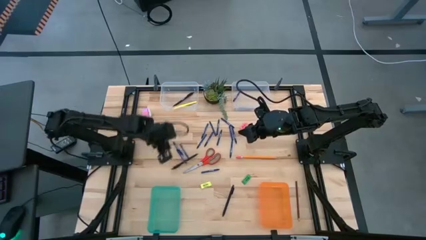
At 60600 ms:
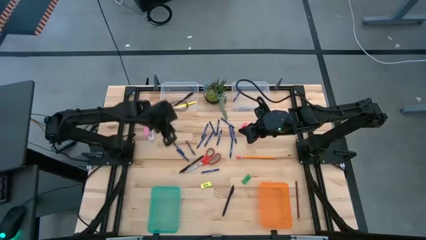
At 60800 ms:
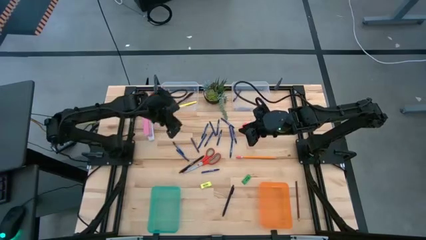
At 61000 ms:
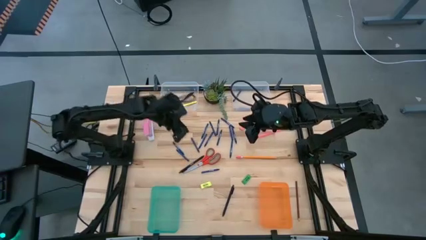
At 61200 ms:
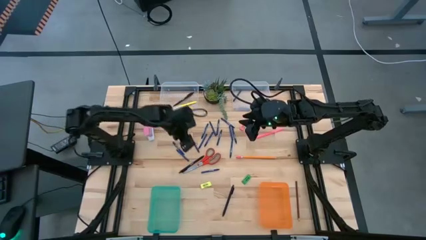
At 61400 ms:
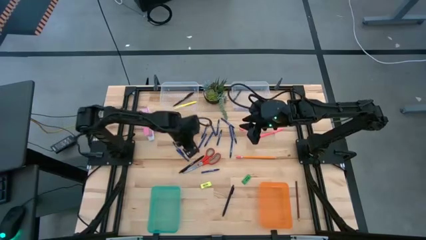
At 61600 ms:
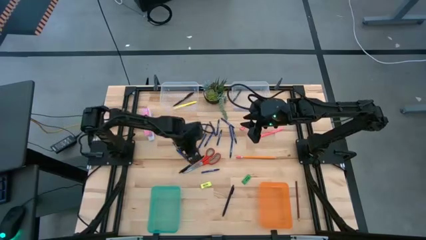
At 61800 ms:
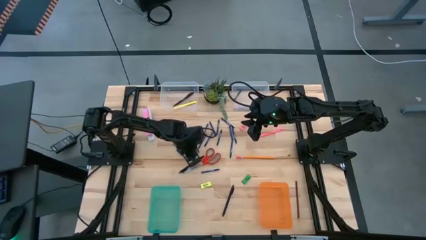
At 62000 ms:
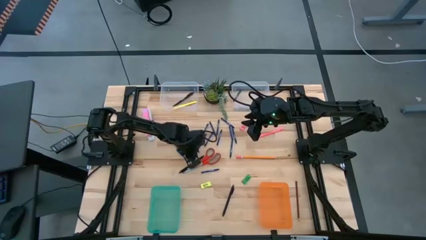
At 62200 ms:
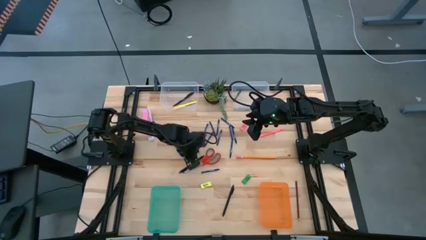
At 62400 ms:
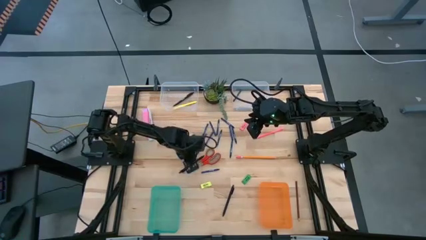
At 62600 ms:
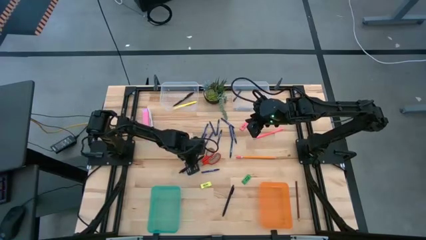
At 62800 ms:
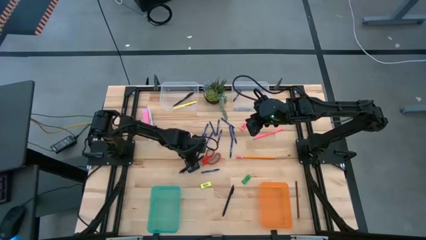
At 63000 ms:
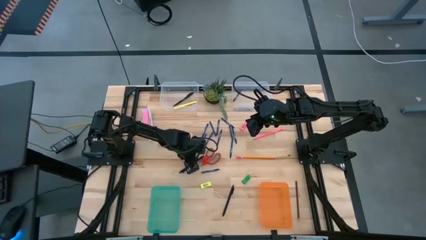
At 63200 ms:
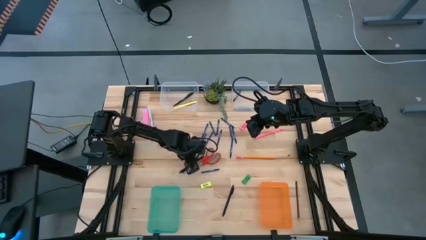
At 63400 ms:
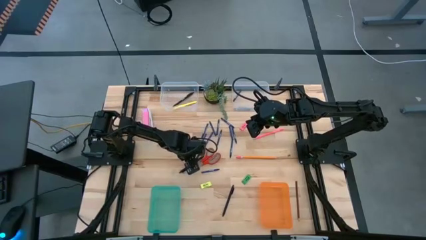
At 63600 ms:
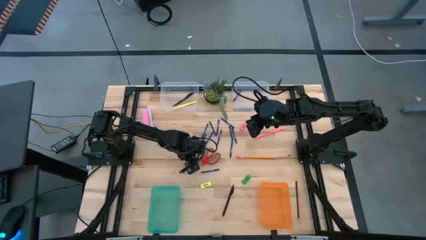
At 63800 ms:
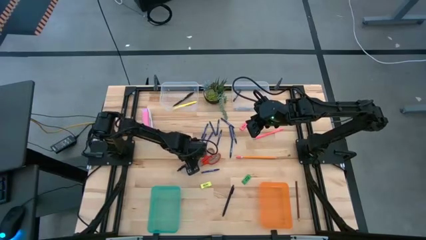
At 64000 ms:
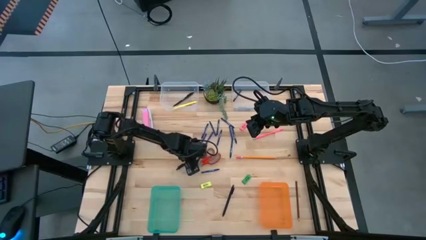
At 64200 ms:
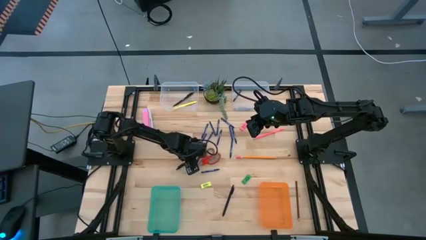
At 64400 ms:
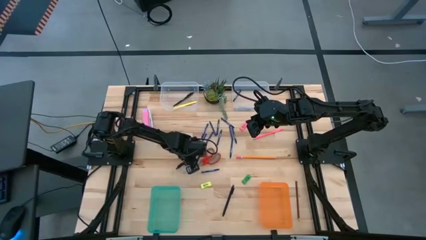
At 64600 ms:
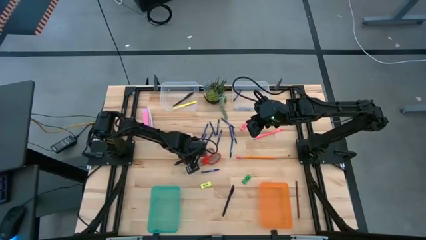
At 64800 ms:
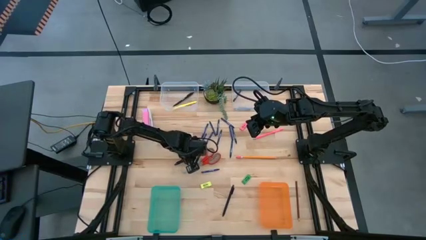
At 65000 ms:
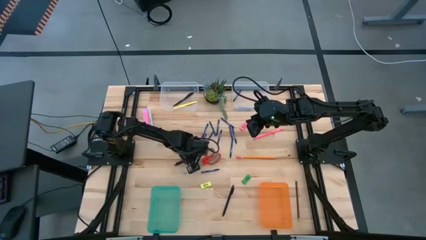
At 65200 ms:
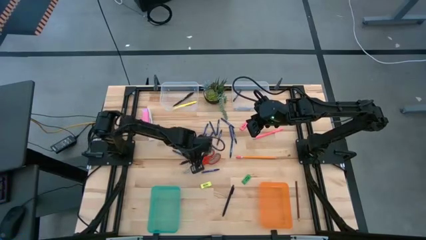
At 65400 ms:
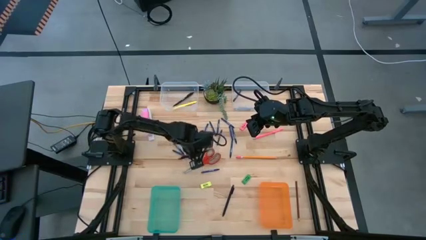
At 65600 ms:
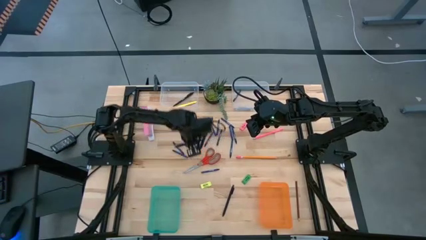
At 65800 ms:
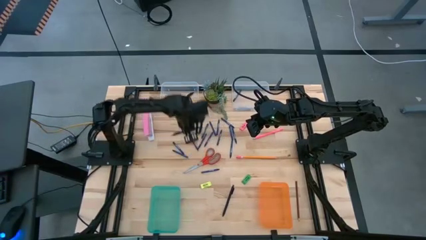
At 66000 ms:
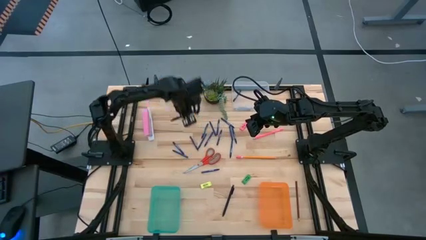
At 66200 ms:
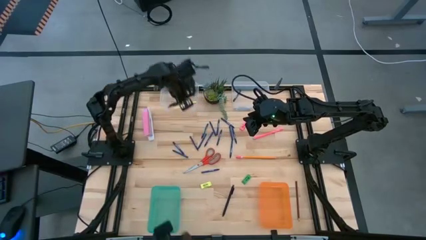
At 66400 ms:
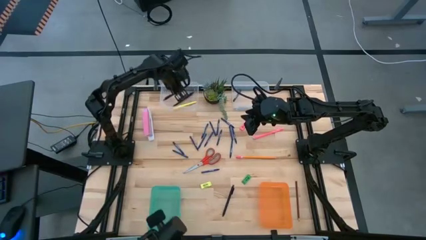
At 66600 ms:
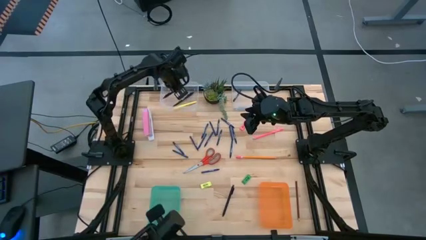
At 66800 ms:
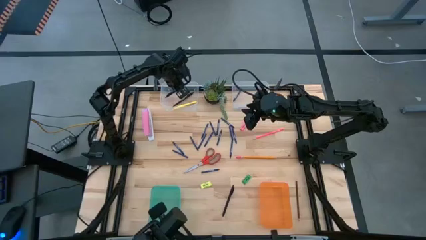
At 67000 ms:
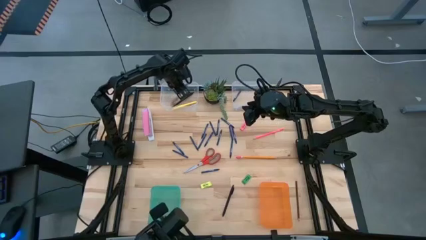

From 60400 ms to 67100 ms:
Task: Sort crayons/erasers/pens/pencils in bins
Put the black pen into the left transparent bin

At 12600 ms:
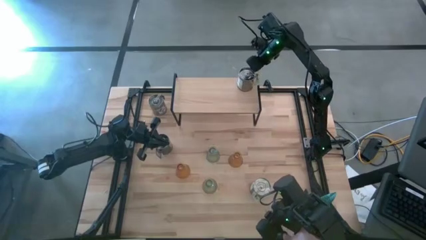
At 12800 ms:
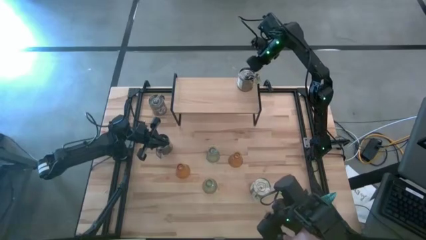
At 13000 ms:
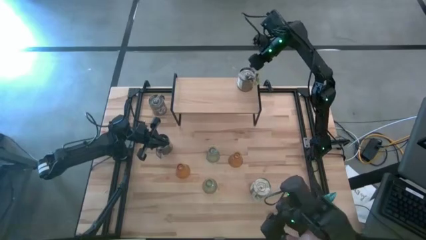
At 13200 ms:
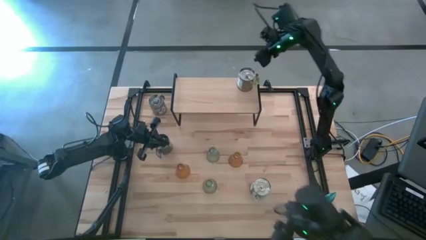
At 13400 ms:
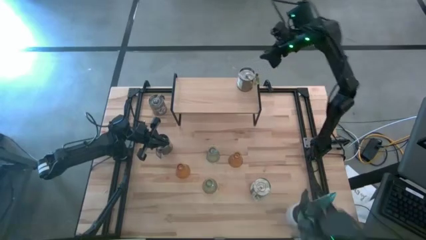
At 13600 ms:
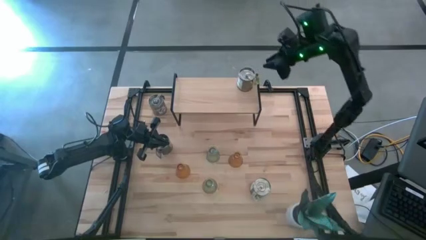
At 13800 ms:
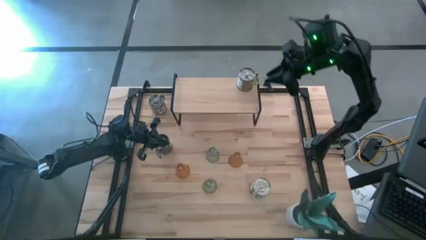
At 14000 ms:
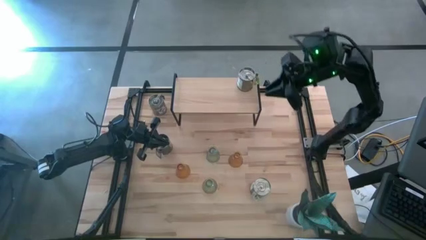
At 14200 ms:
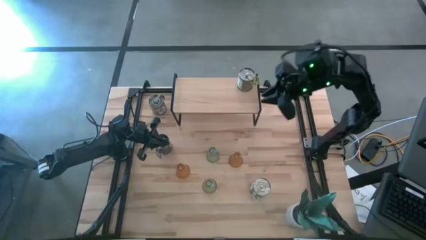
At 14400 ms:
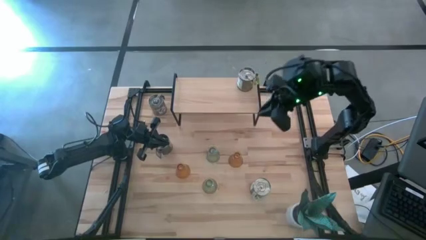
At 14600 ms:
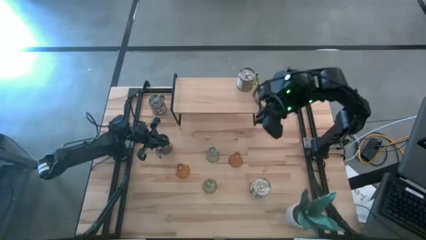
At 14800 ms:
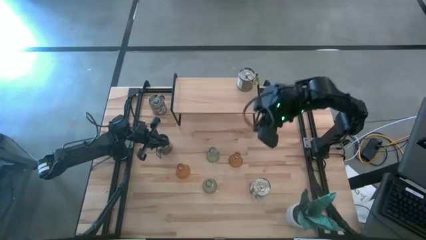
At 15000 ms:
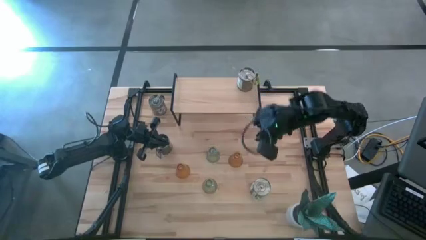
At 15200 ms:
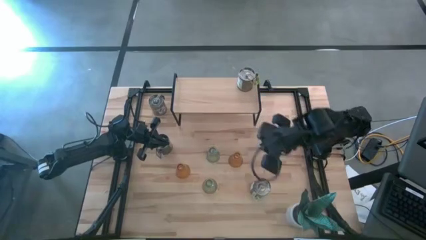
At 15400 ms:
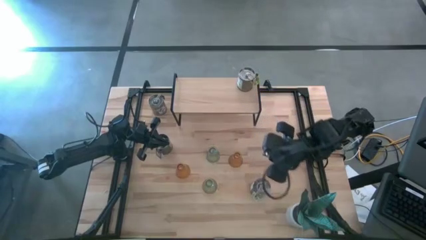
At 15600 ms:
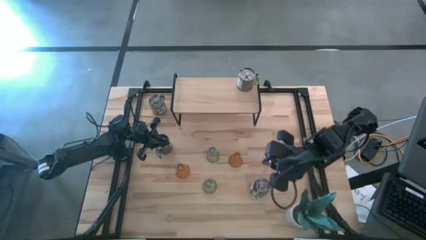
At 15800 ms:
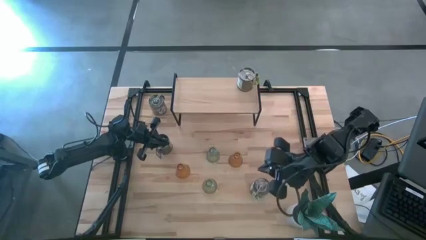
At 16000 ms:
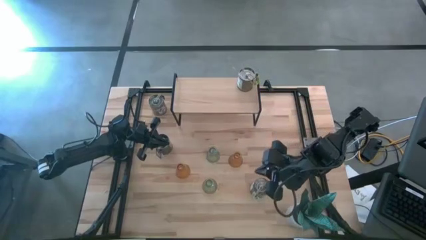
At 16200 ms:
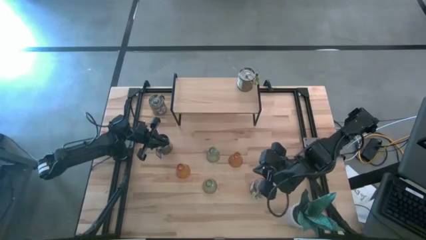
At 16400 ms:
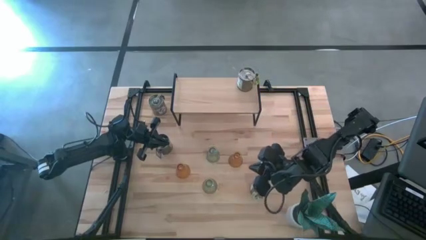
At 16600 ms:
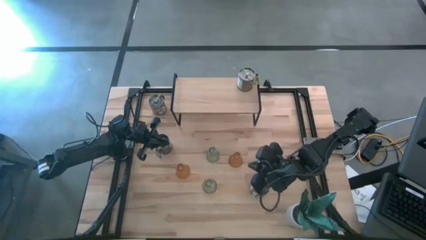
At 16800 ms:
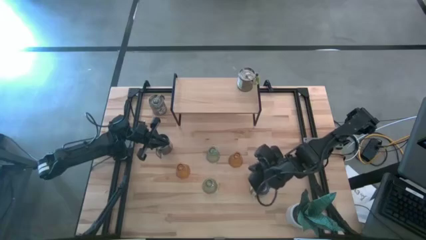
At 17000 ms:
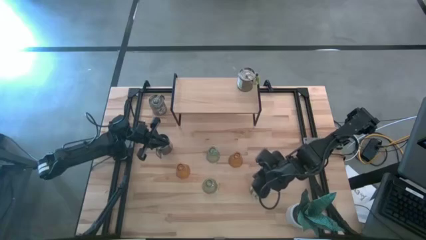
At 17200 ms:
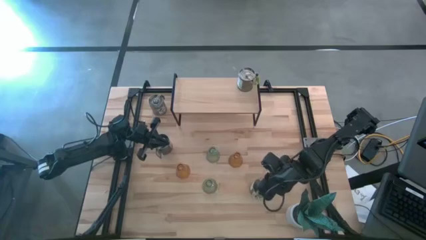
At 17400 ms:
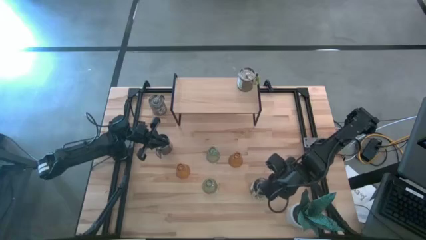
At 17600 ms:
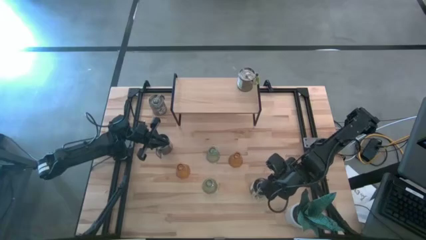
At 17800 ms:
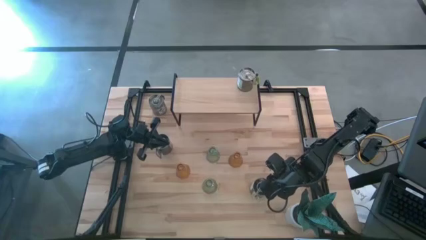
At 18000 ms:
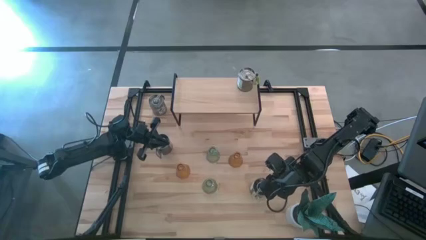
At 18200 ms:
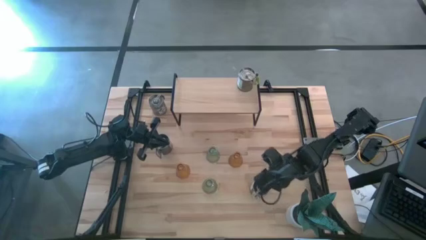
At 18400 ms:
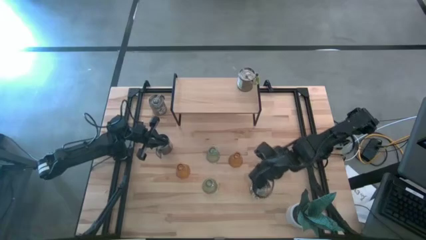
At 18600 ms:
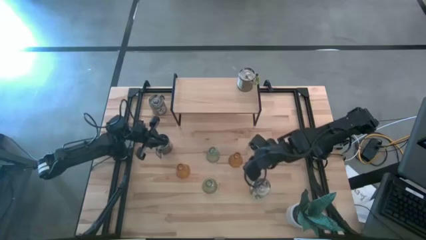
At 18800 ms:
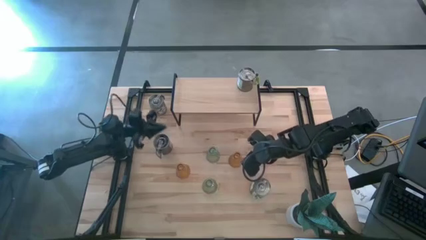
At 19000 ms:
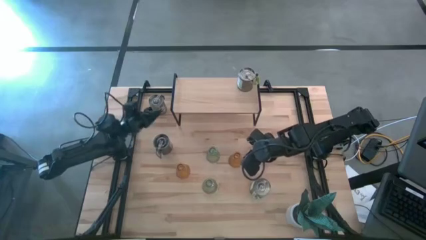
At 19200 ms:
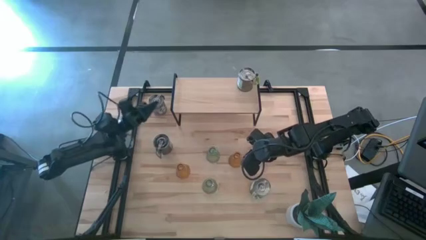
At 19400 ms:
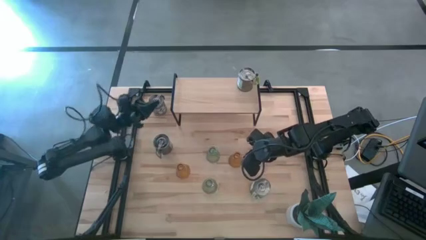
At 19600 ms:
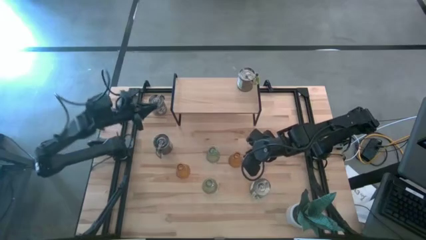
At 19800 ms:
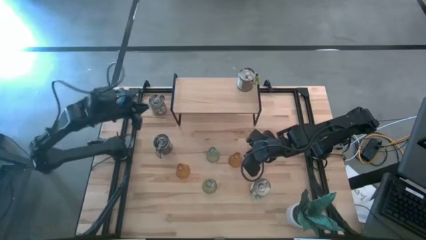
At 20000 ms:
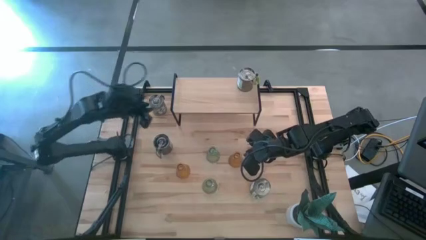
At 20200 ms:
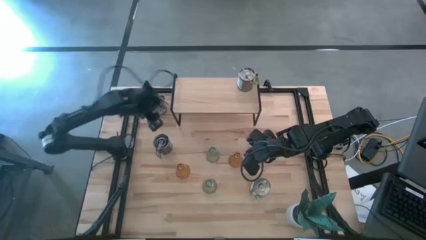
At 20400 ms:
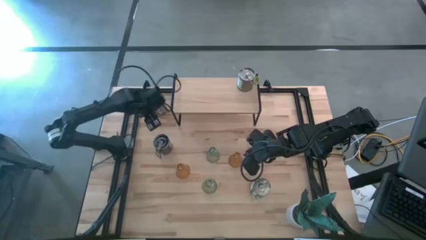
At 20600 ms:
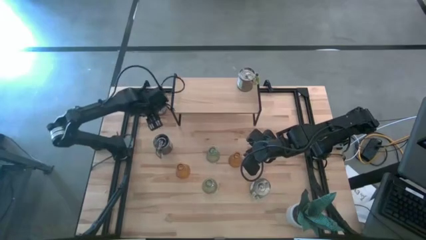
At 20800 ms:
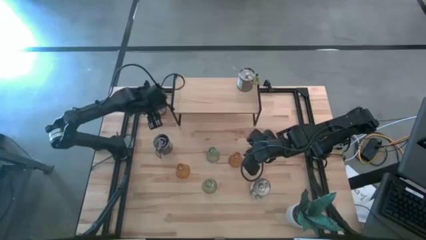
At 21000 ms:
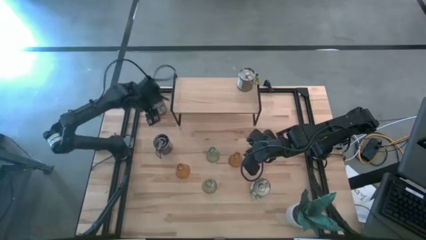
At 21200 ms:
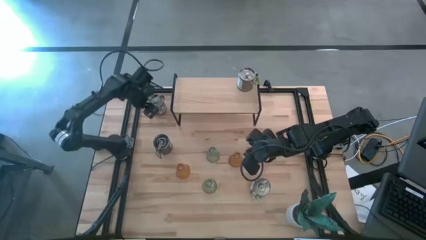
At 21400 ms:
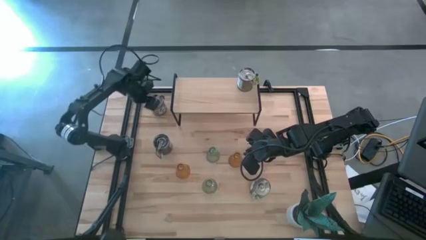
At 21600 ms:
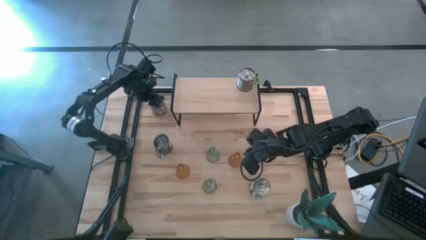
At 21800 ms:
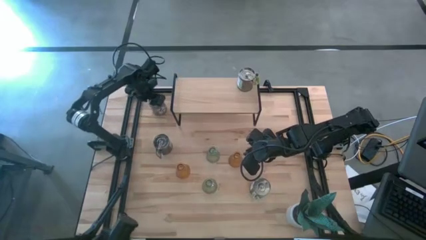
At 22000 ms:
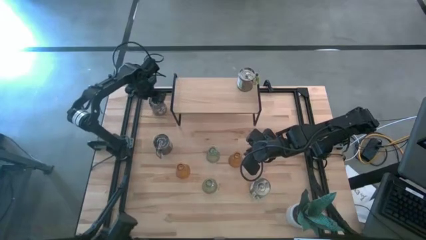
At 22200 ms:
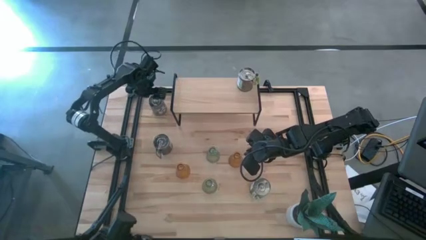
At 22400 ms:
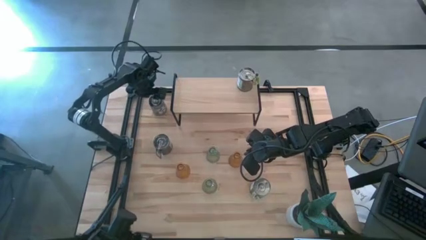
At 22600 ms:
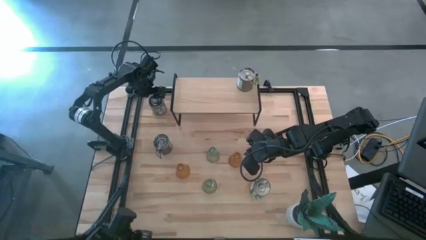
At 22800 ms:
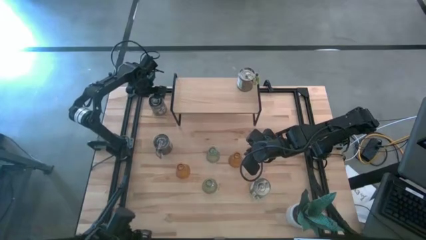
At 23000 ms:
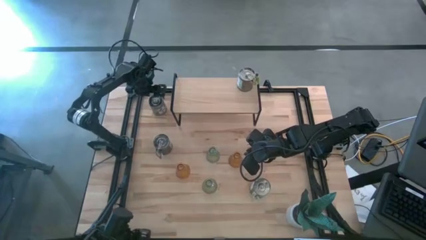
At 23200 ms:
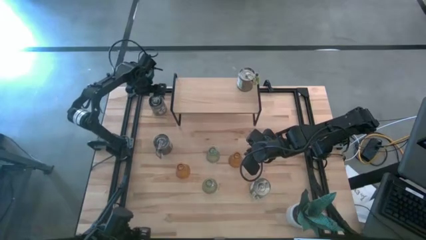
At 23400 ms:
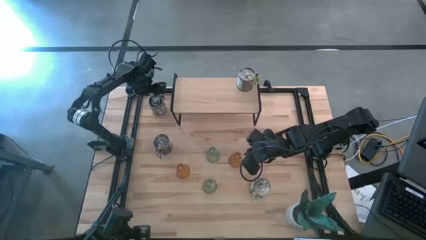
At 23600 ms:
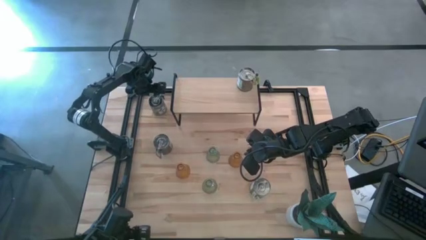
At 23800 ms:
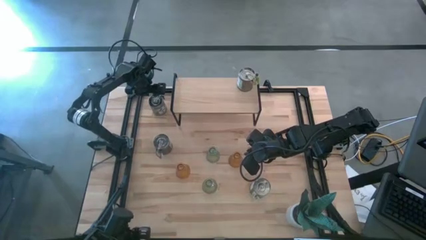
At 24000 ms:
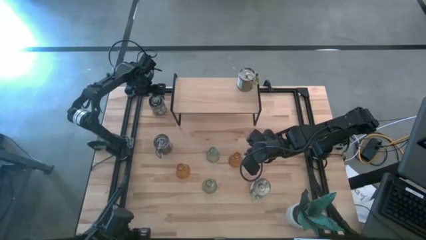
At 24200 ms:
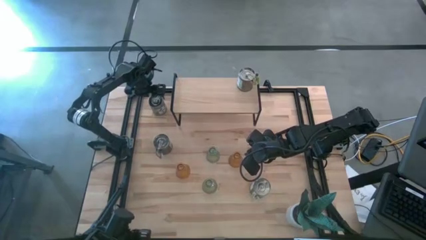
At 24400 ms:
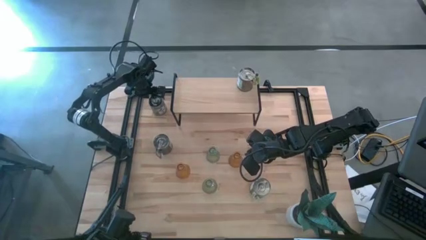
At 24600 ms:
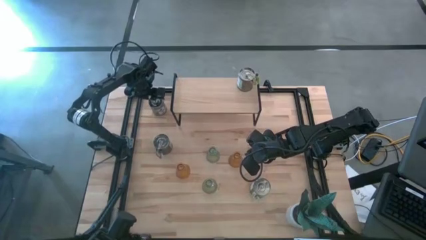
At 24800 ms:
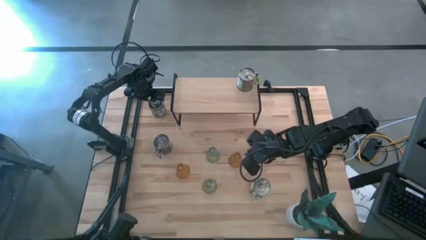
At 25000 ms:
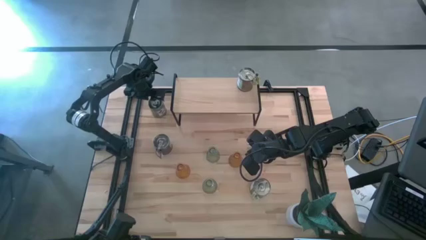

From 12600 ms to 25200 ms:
Task: Pick & Place candle stick holders
Put the silver scented candle on the shelf
